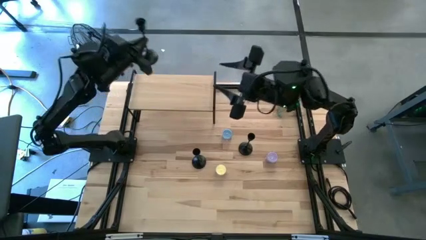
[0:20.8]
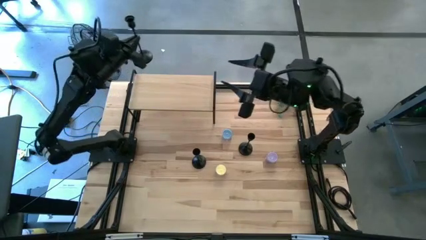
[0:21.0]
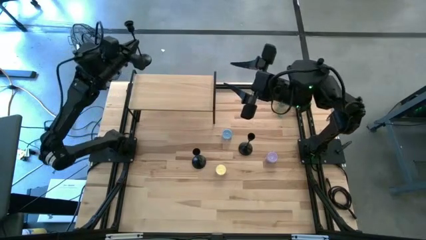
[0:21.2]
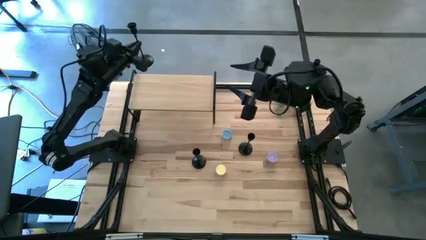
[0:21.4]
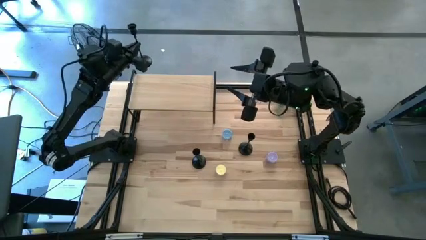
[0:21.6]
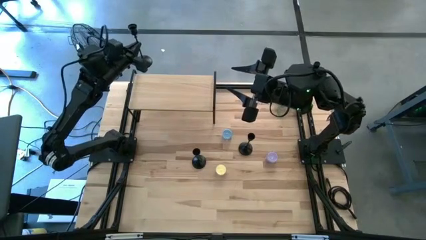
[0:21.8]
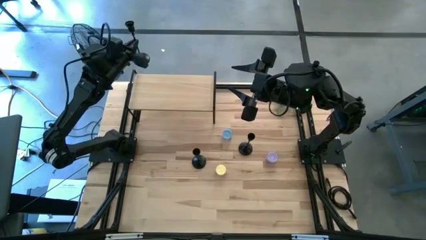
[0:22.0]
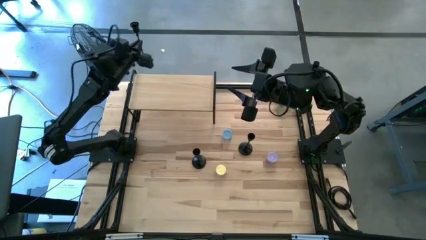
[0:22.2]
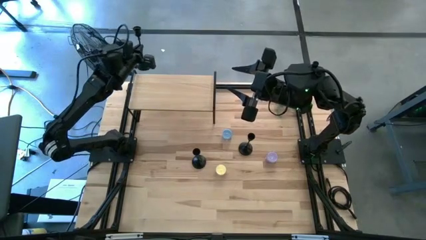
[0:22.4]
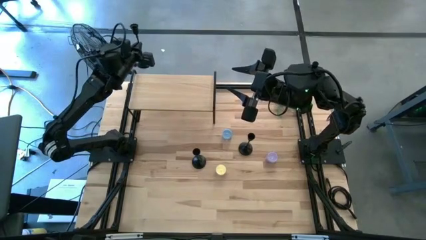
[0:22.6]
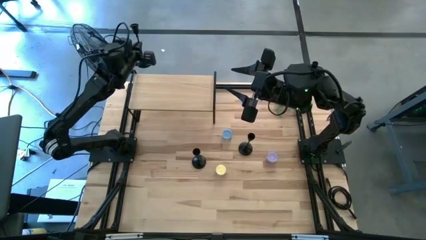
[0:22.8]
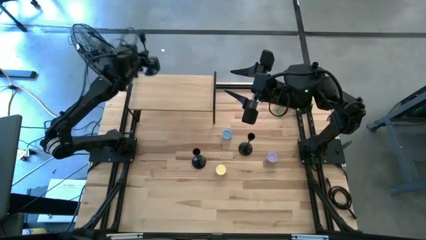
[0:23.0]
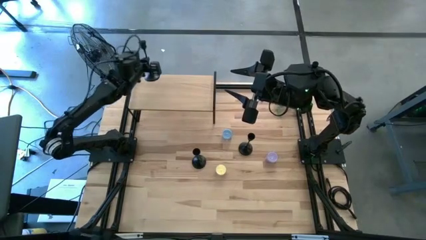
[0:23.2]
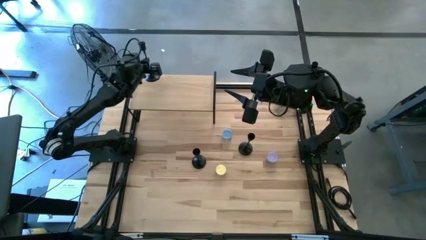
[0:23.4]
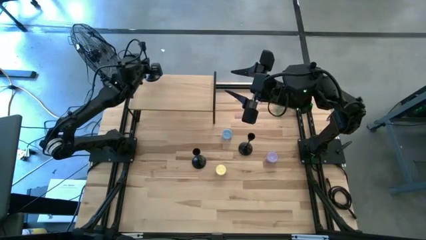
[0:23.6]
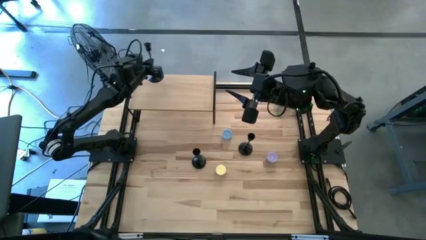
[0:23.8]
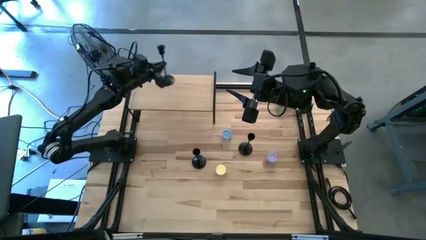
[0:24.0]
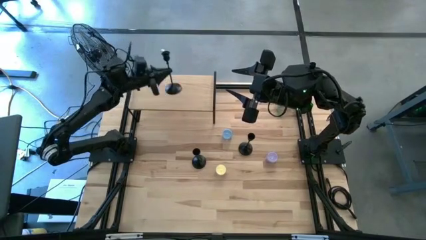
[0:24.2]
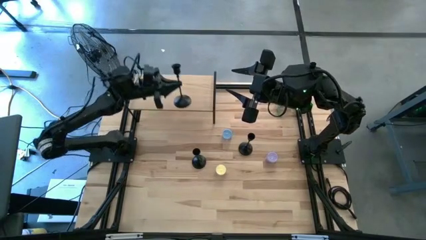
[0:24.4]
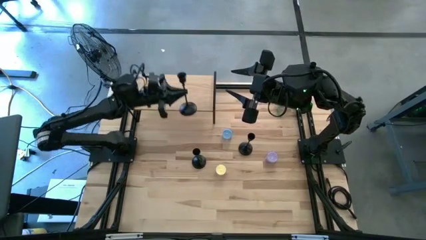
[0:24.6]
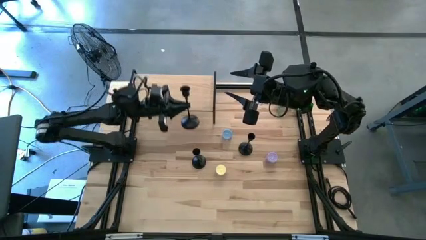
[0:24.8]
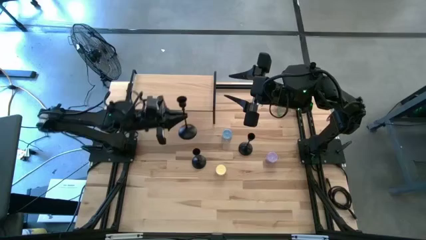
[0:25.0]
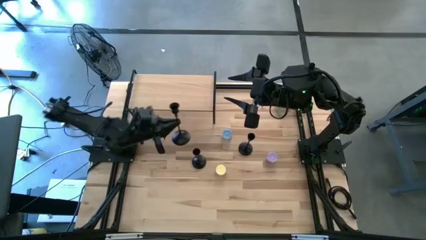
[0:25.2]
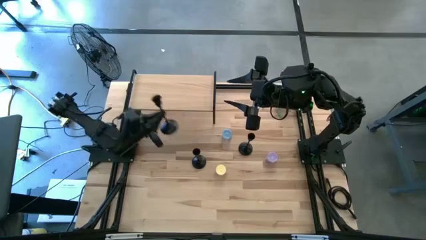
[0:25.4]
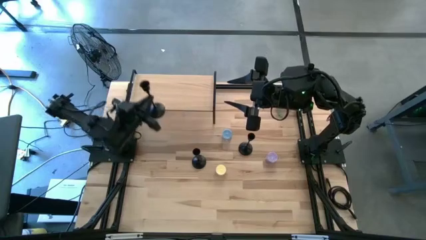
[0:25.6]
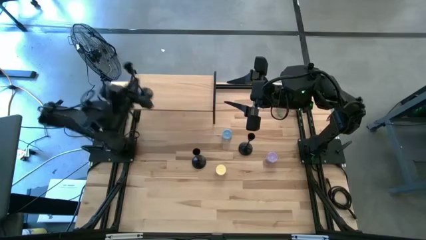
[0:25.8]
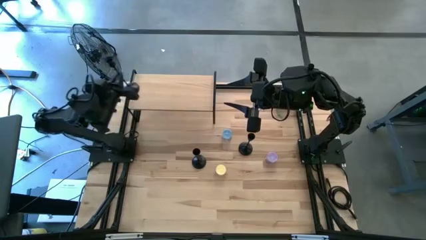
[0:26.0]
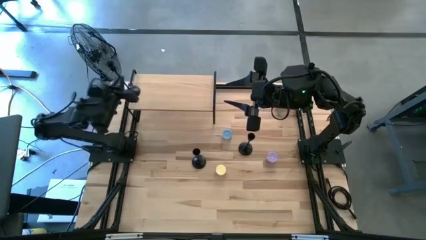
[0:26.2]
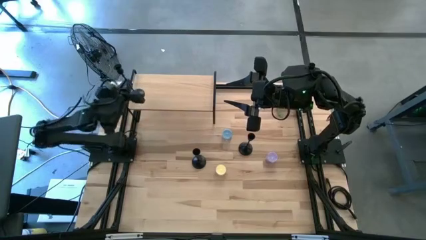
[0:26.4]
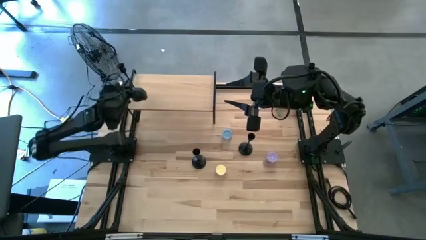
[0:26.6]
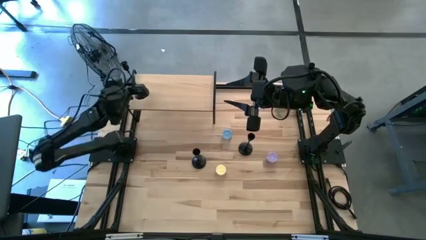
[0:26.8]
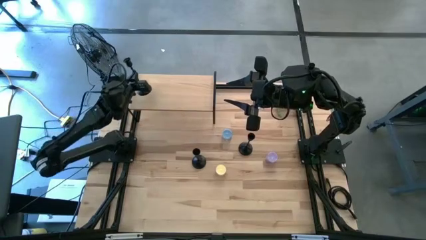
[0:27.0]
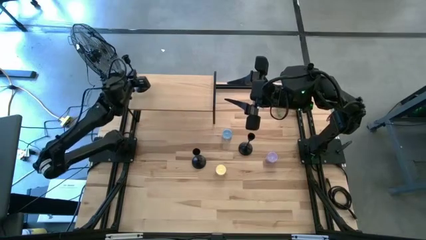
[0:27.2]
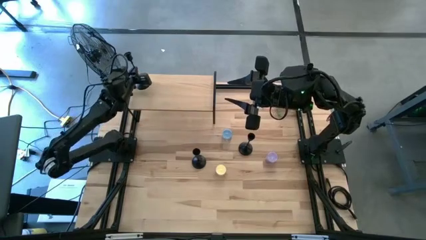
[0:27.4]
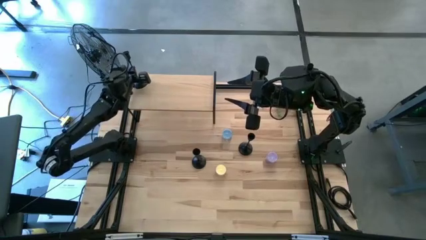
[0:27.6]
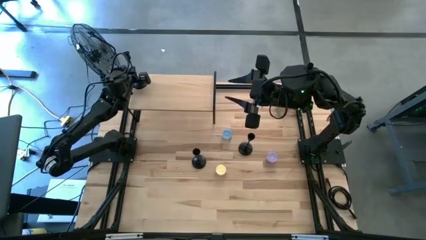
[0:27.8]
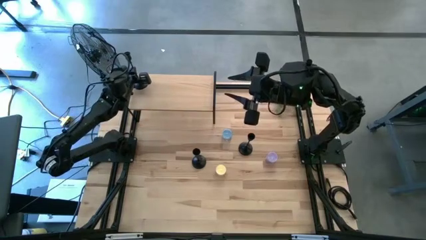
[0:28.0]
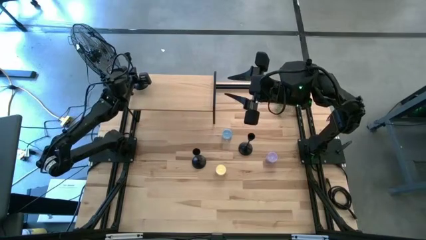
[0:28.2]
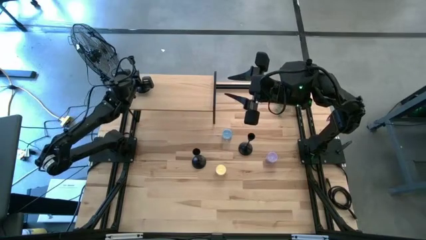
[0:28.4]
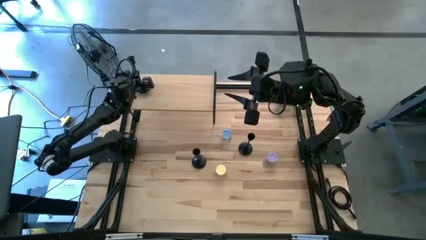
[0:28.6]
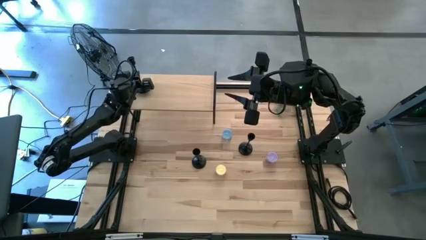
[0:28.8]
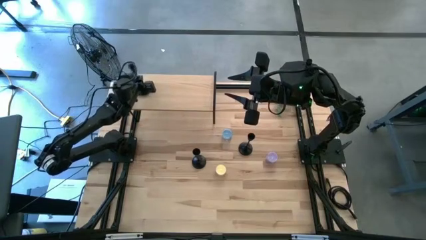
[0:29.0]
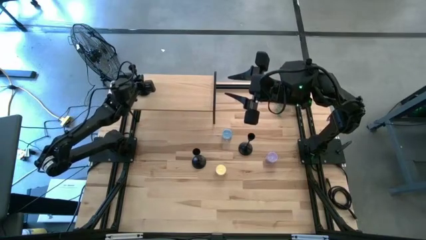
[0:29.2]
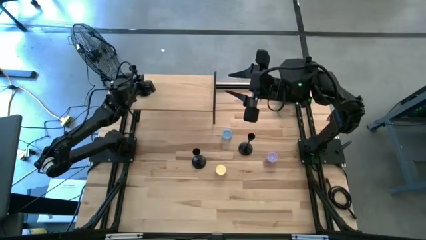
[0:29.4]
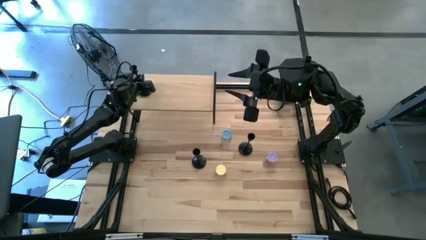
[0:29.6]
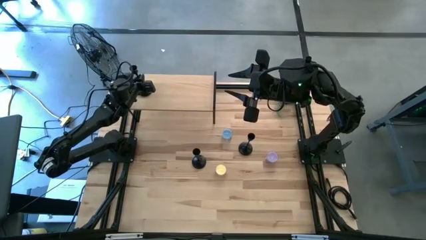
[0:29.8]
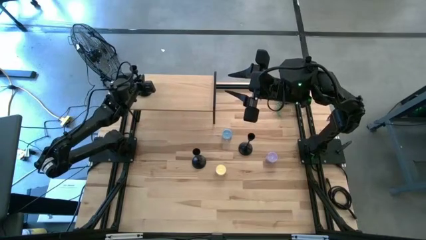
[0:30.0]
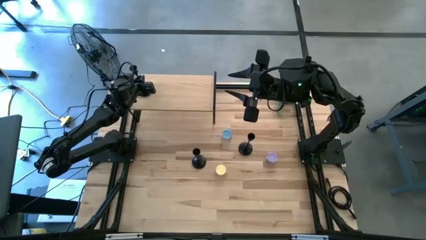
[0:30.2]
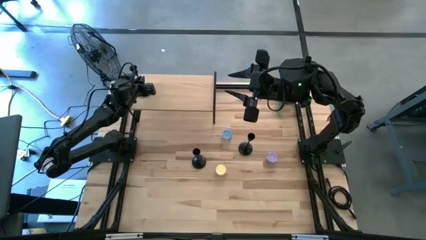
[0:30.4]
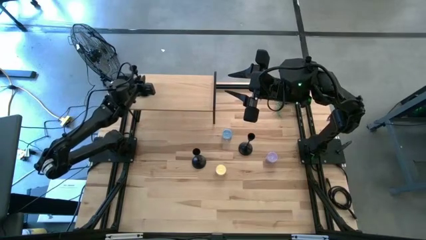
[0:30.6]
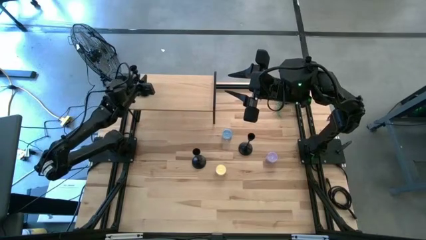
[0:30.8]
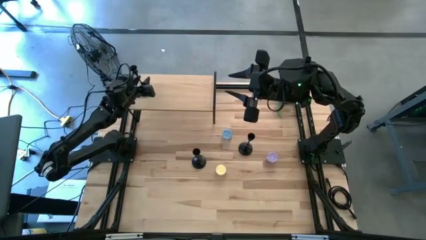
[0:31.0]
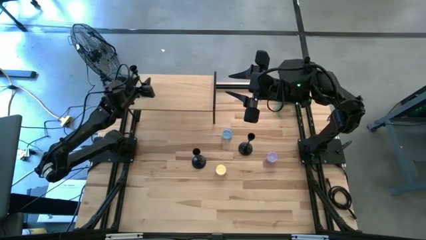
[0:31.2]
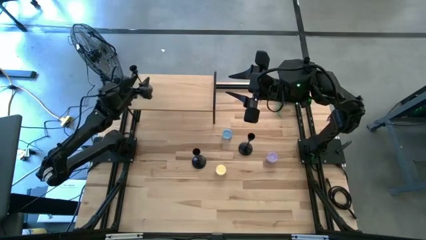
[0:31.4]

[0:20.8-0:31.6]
Task: Pick & Place candle stick holders
Put the top black candle holder on the shelf

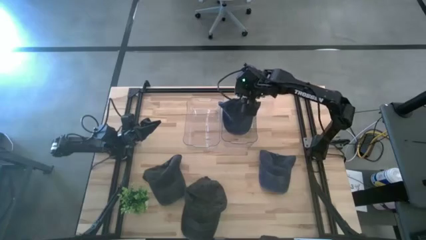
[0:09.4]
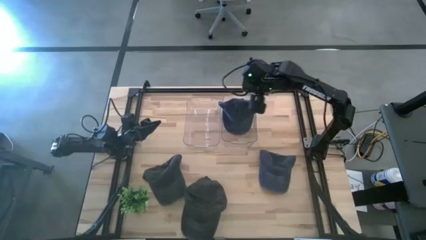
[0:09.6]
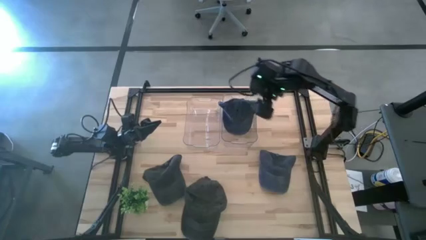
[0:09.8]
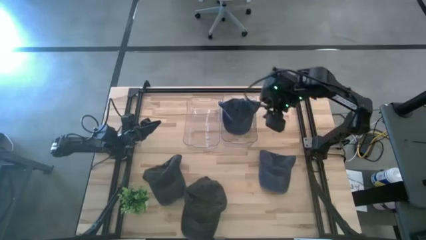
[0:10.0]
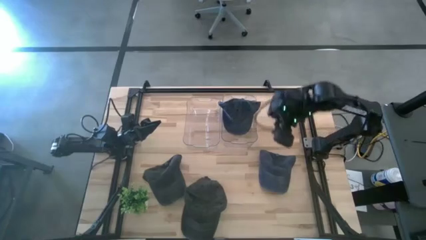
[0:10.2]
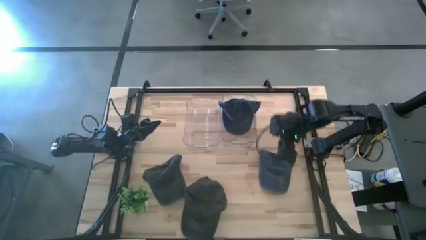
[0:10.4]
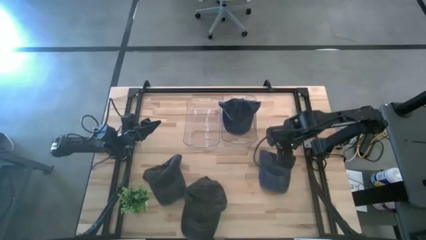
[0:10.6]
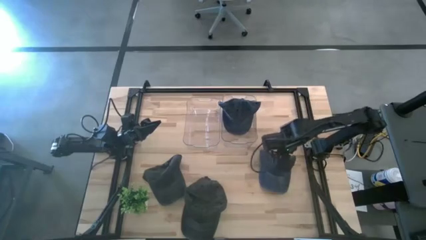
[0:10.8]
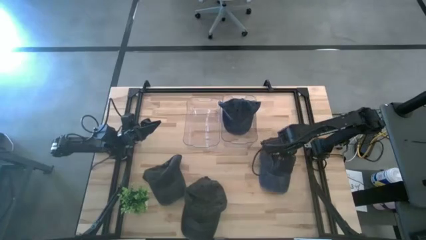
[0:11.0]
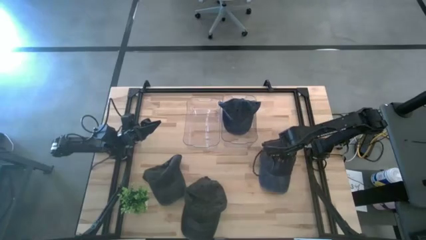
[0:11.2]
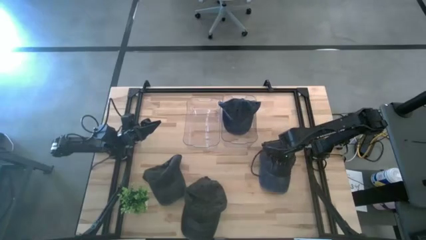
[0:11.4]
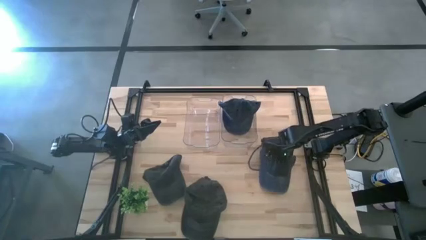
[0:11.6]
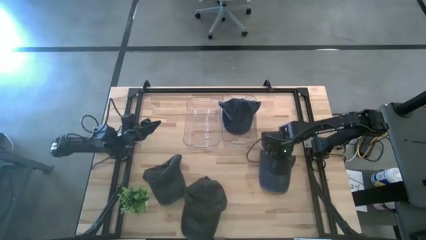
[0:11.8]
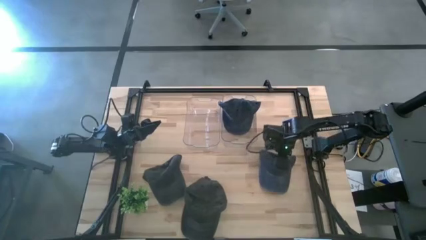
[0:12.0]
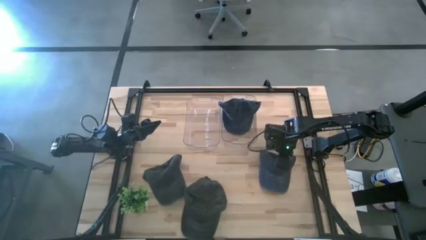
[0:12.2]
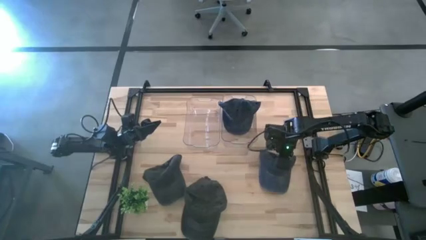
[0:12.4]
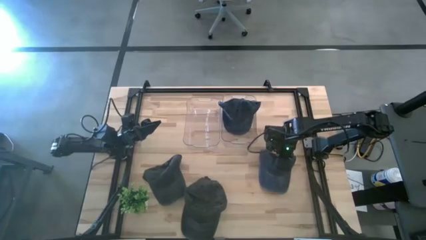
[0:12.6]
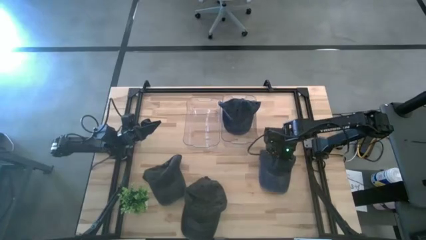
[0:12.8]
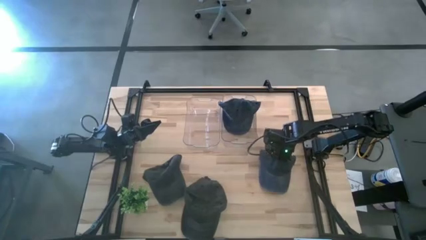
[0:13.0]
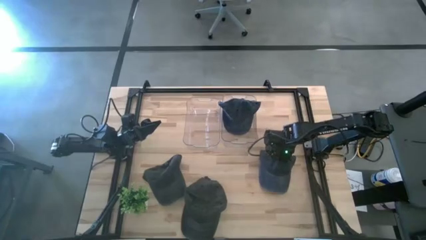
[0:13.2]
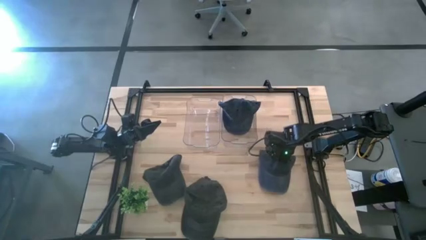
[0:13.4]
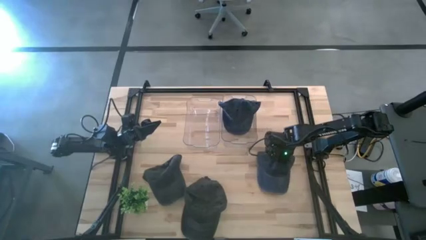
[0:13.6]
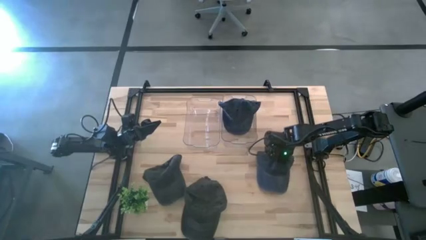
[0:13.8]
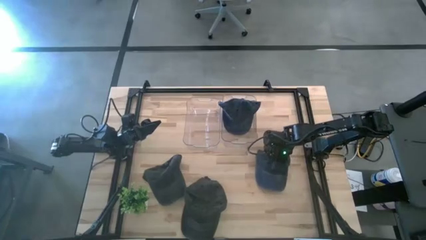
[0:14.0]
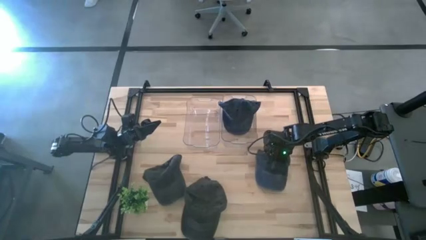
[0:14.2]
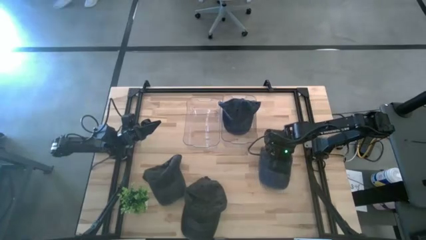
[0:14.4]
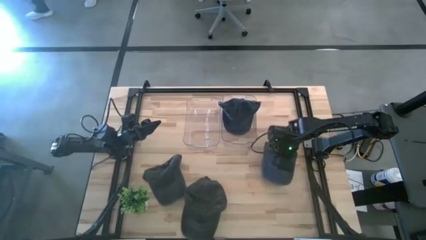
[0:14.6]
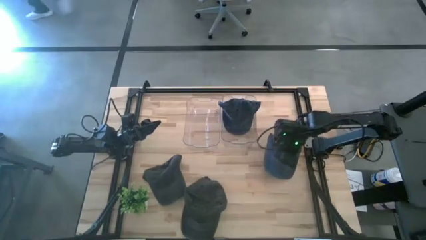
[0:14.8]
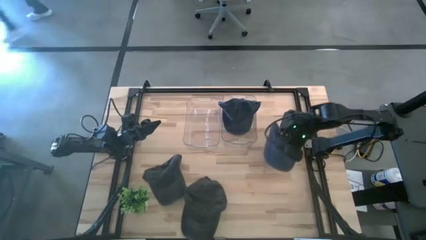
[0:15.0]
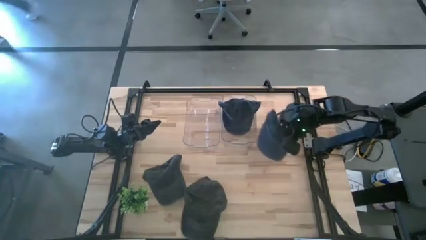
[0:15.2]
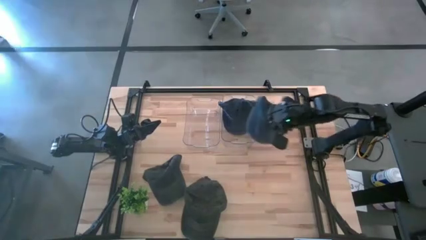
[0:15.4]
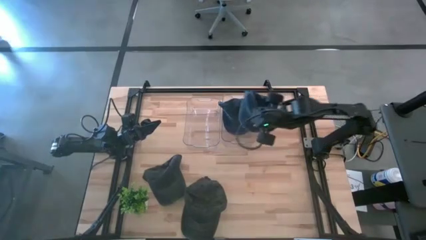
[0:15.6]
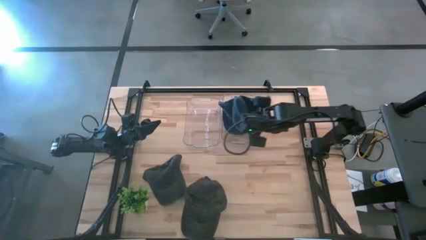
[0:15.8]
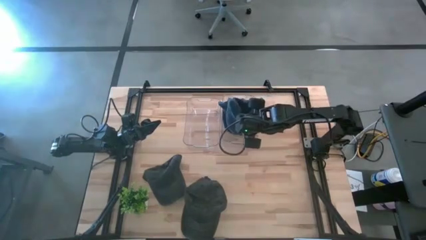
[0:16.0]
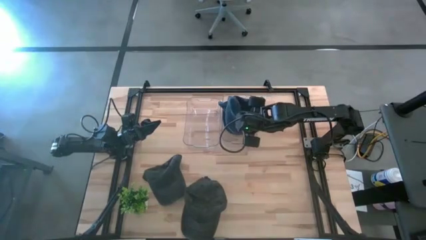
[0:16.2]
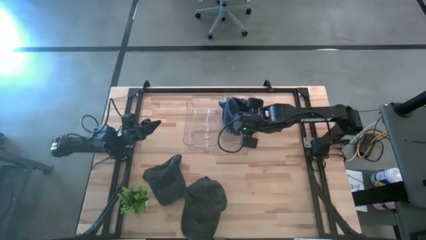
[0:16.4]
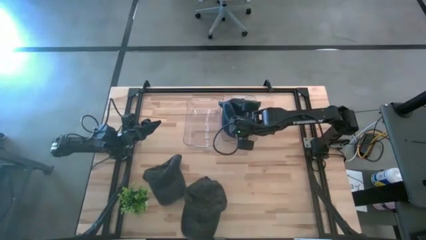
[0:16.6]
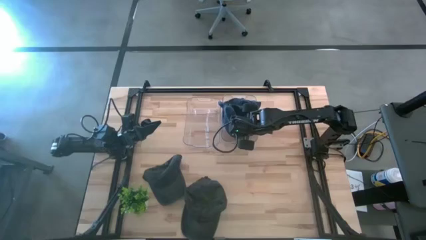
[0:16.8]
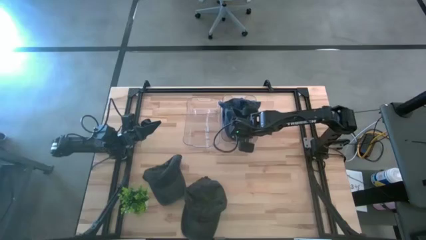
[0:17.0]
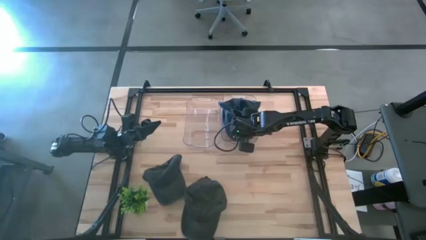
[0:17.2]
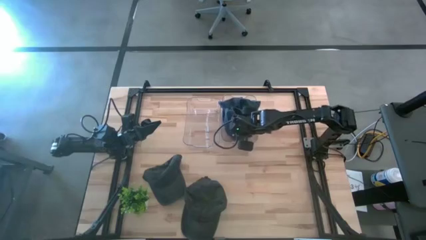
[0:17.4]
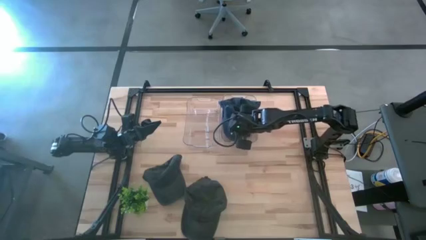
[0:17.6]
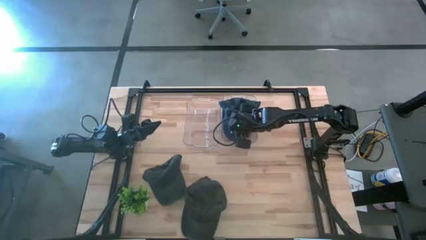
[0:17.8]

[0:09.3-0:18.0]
Task: Pick & Place hat
Put the blue cap into the right transparent bin
